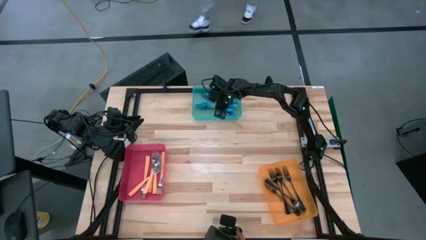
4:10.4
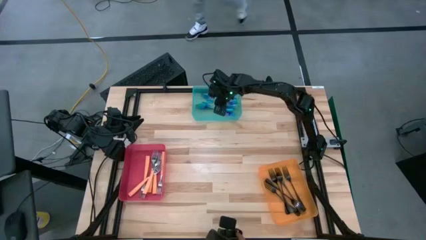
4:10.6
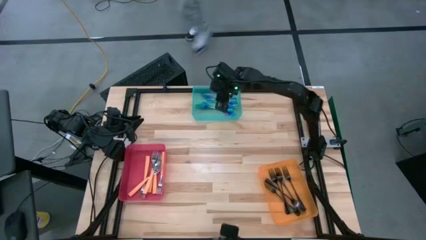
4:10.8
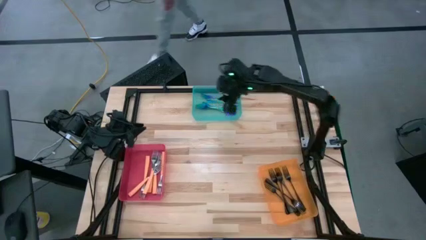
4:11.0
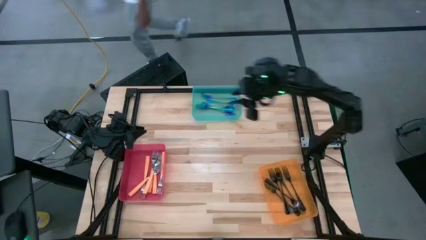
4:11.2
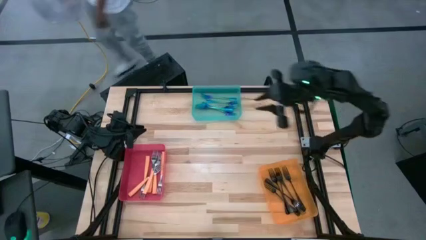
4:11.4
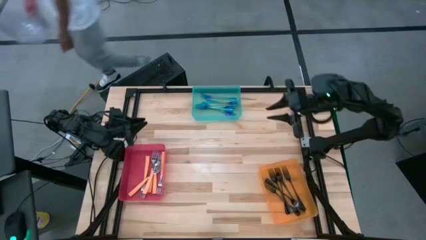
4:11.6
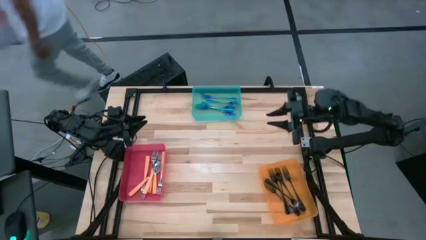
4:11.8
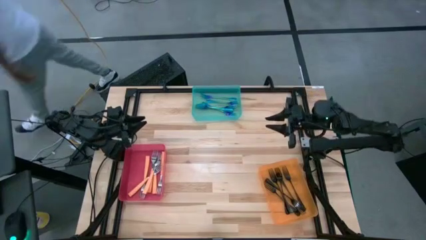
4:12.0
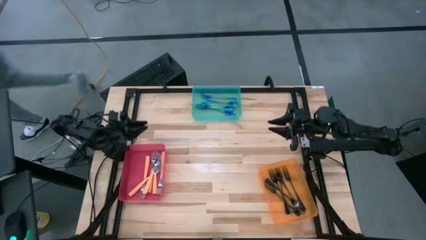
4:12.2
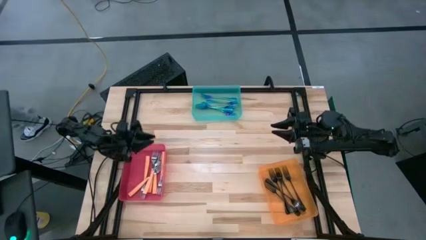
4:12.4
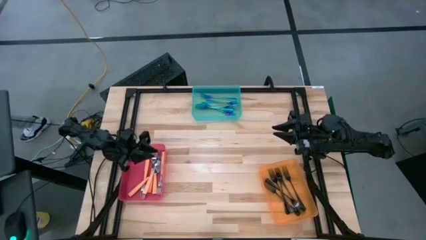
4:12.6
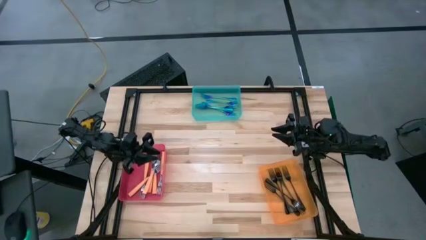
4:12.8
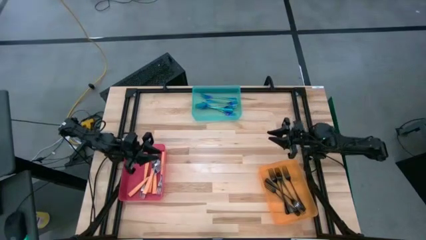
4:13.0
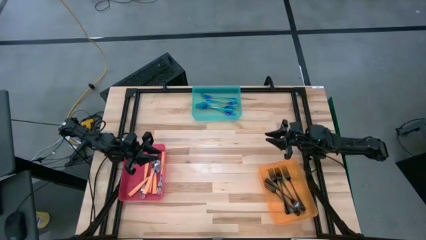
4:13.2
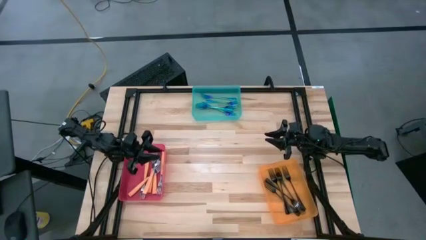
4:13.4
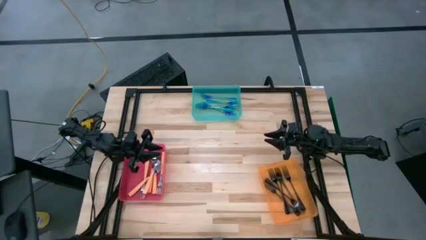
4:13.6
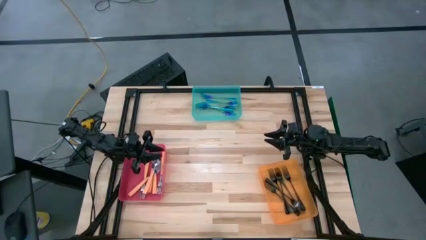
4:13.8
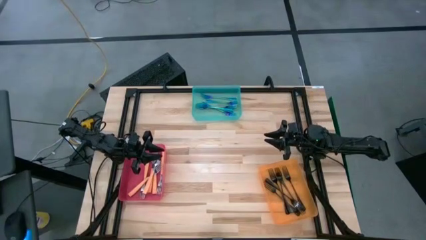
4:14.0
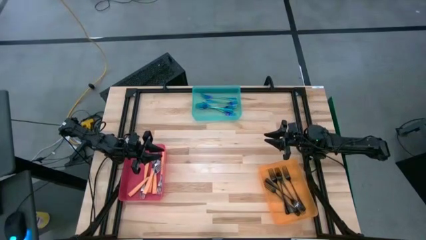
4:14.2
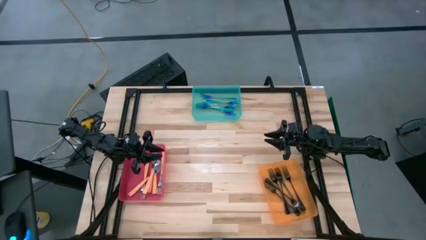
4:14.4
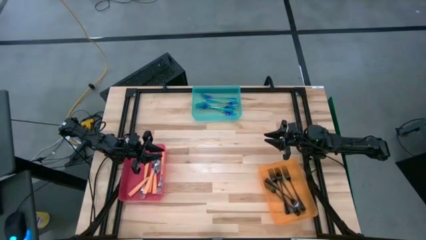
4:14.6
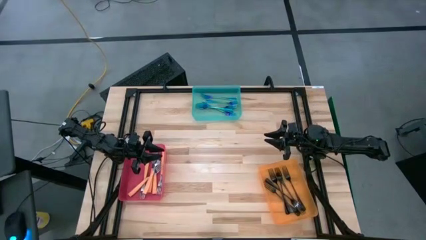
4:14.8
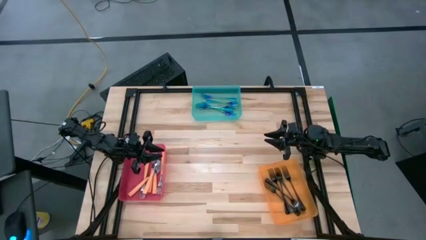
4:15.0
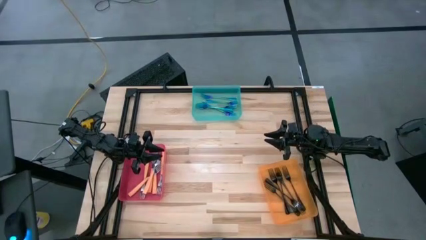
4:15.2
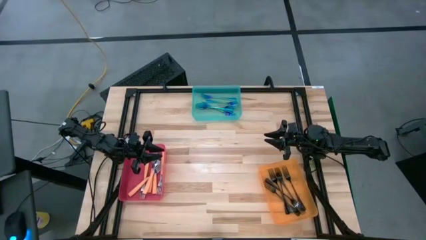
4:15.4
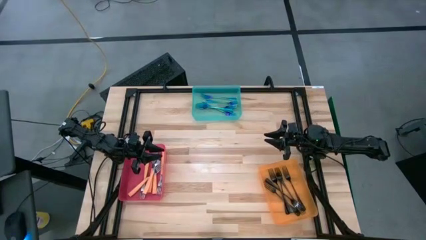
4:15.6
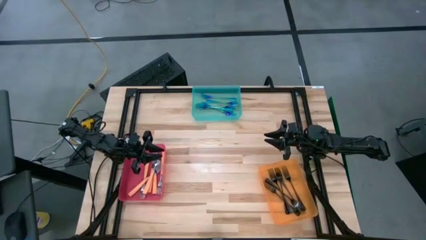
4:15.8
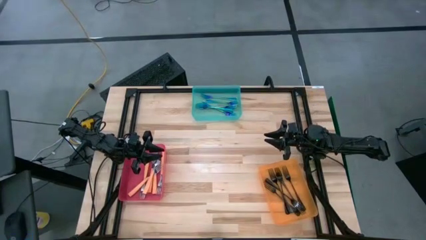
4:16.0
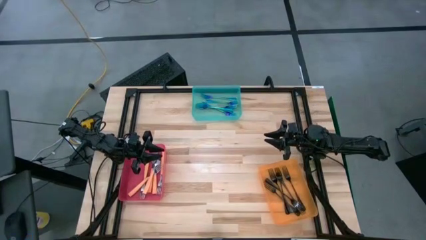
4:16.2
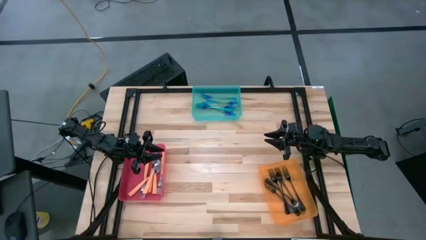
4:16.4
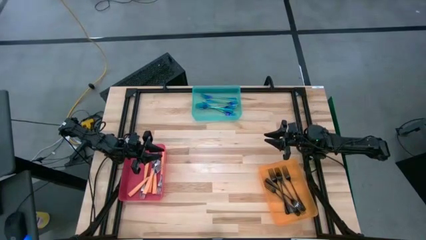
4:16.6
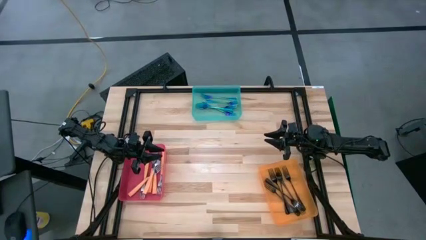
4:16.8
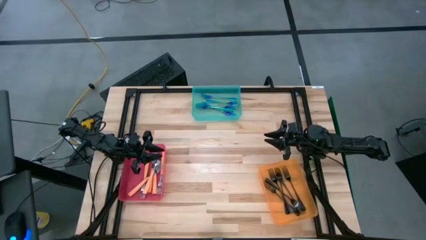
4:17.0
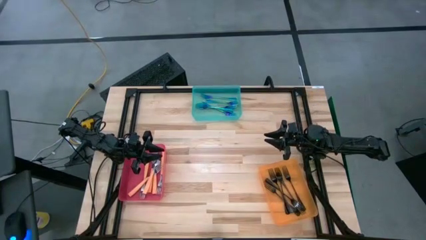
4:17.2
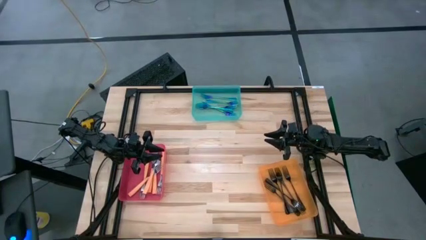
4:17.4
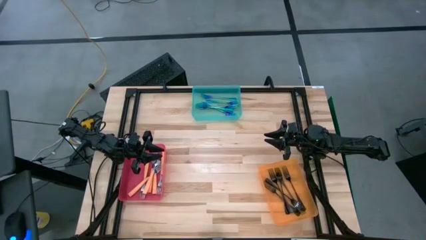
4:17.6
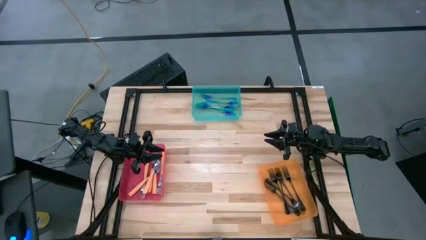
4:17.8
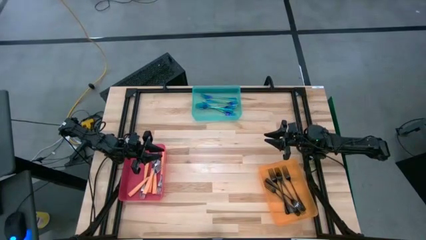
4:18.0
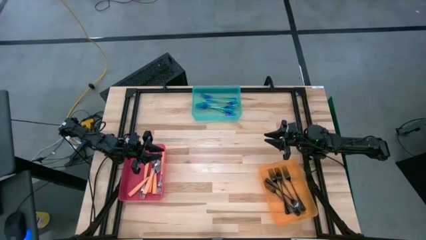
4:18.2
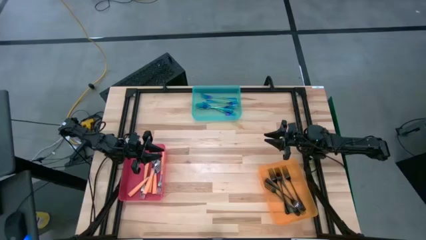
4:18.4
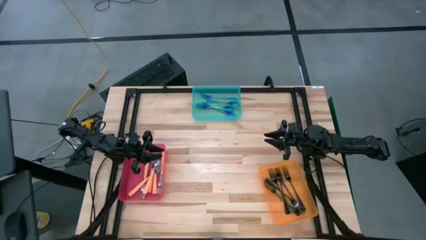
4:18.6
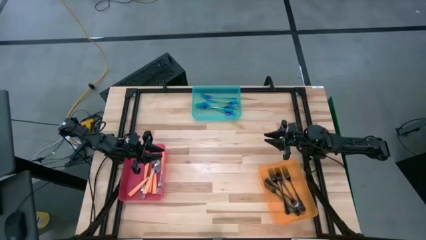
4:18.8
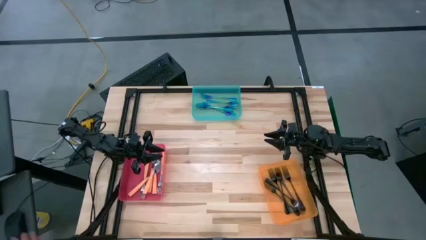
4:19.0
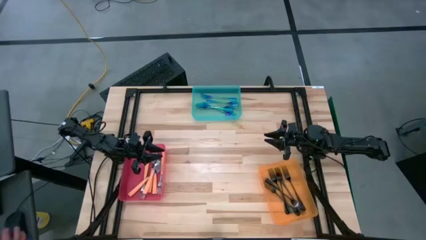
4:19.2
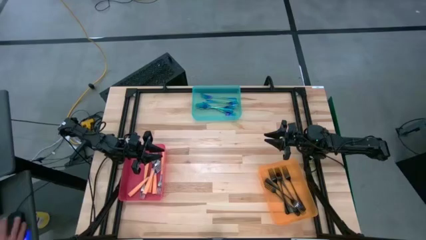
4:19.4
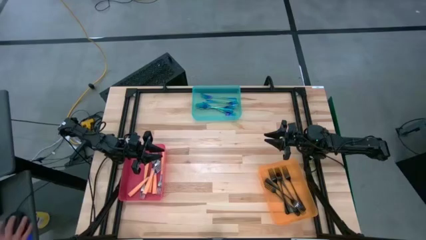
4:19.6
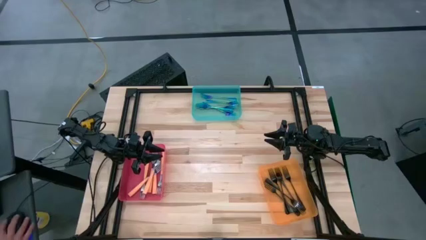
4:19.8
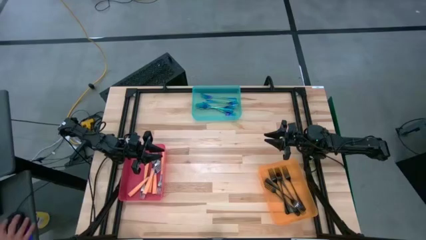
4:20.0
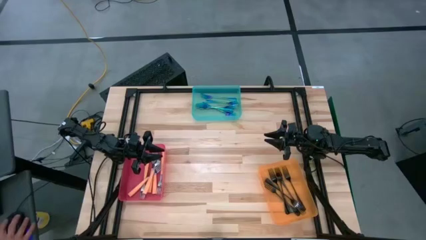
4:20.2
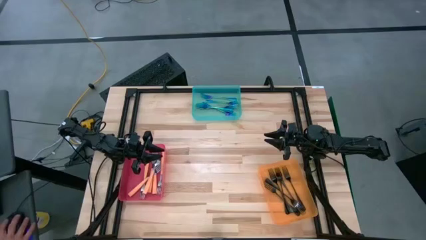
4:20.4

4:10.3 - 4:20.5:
Task: Sort silverware by color (type)
Return to Home Position

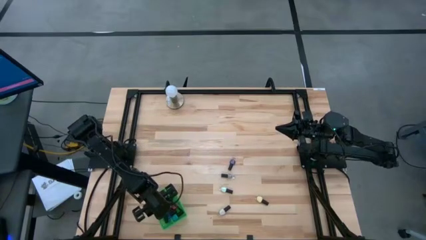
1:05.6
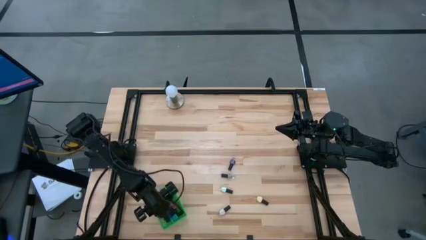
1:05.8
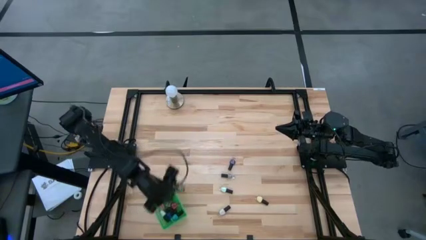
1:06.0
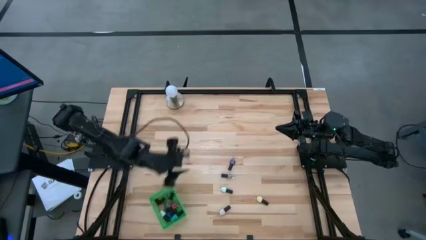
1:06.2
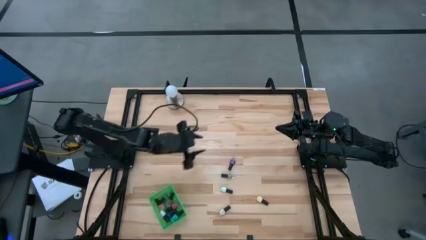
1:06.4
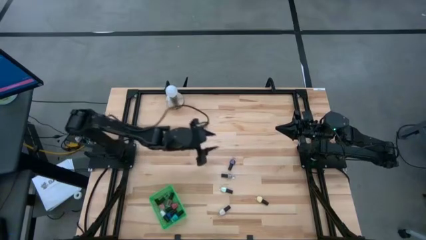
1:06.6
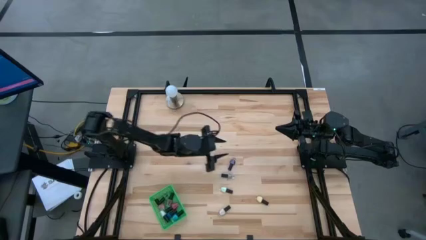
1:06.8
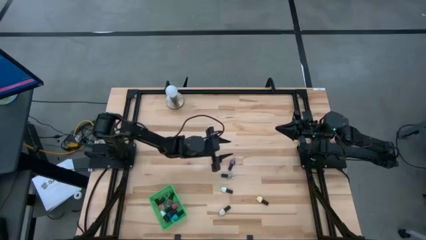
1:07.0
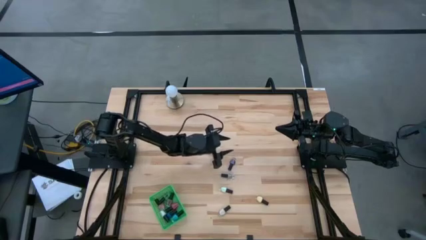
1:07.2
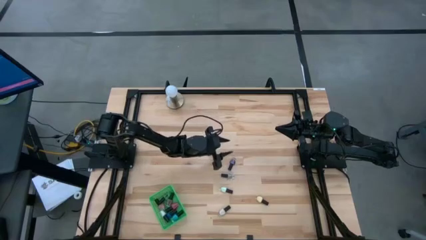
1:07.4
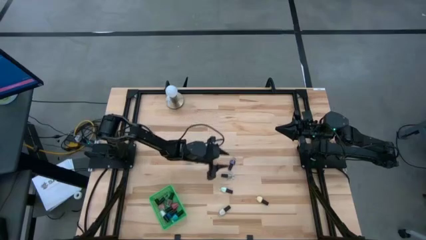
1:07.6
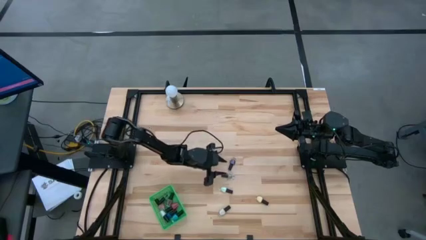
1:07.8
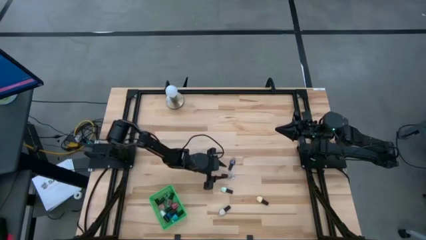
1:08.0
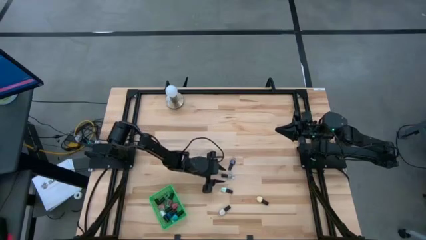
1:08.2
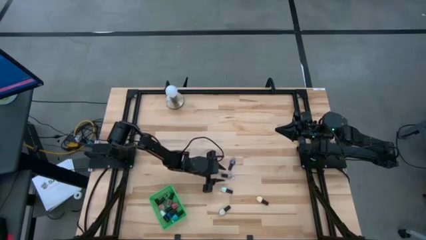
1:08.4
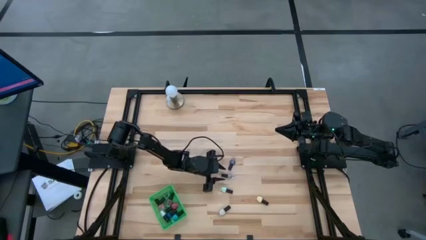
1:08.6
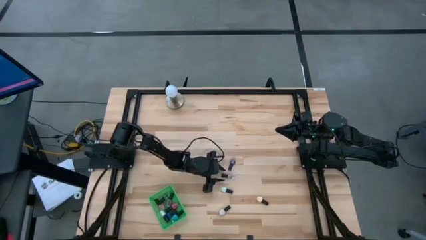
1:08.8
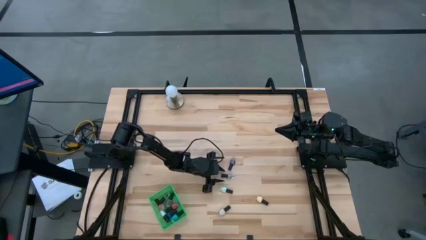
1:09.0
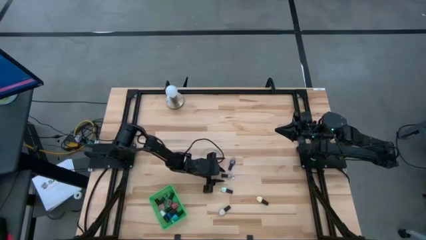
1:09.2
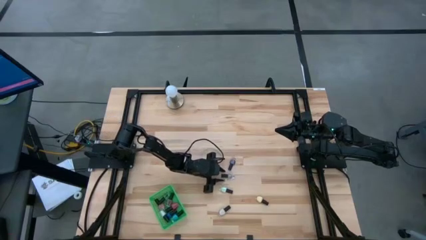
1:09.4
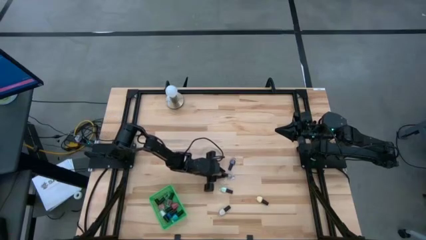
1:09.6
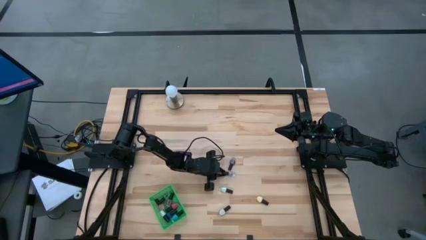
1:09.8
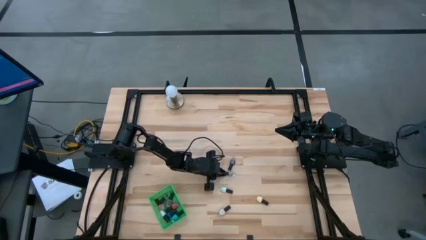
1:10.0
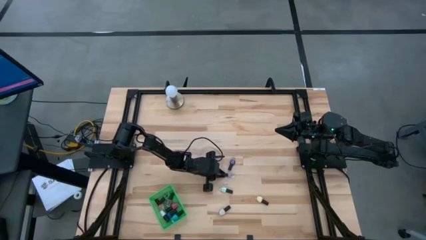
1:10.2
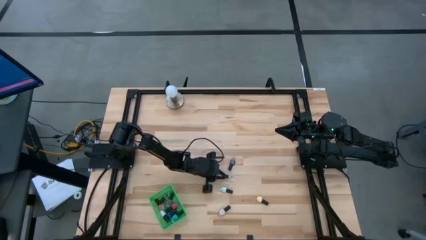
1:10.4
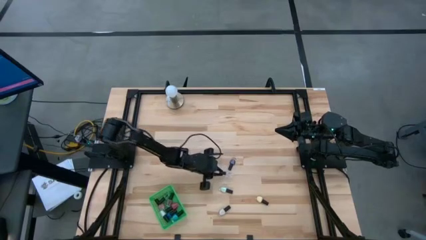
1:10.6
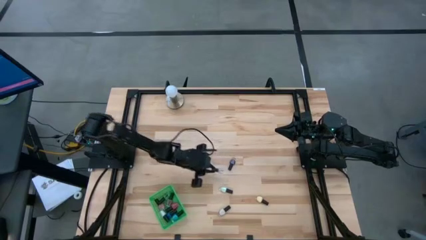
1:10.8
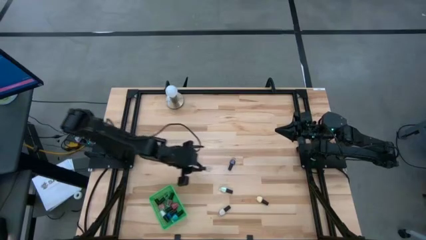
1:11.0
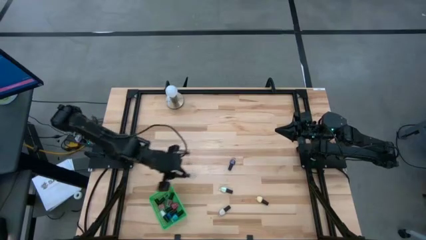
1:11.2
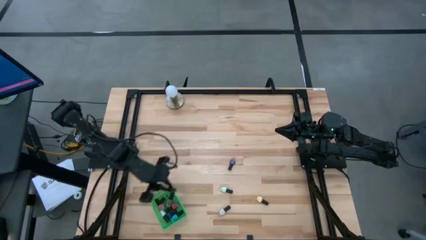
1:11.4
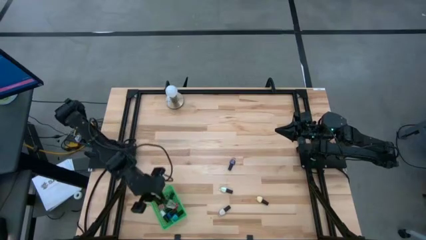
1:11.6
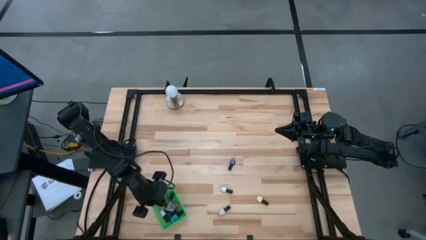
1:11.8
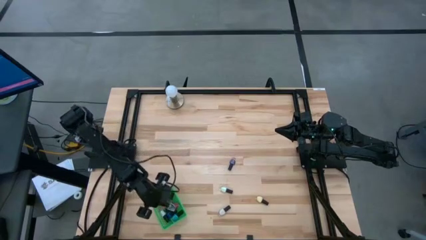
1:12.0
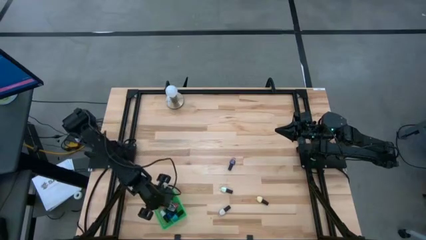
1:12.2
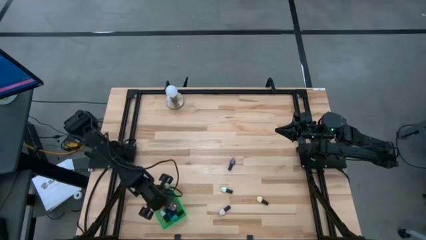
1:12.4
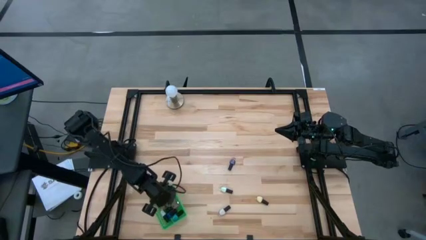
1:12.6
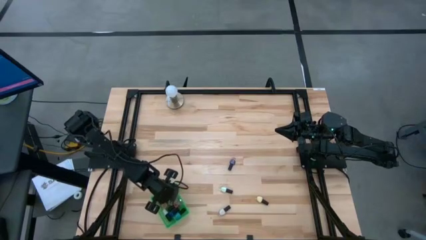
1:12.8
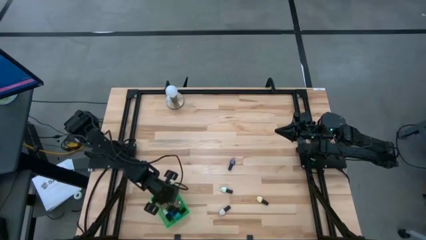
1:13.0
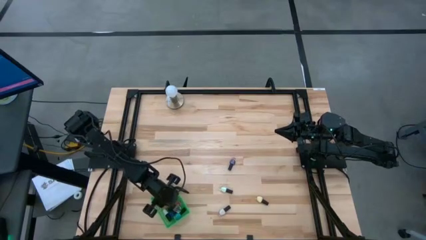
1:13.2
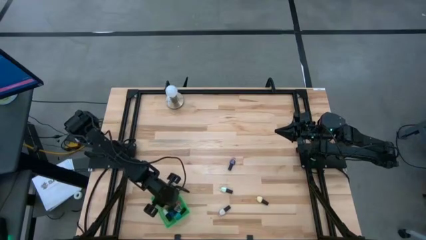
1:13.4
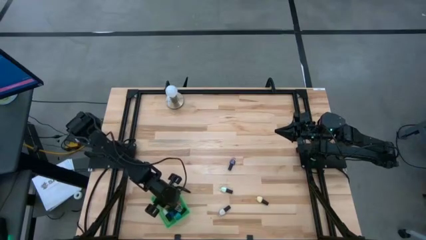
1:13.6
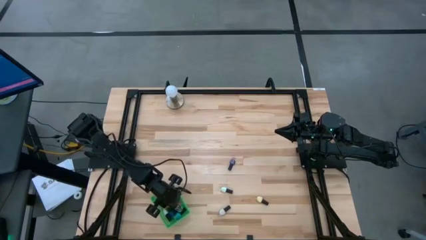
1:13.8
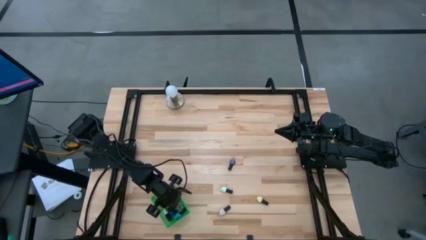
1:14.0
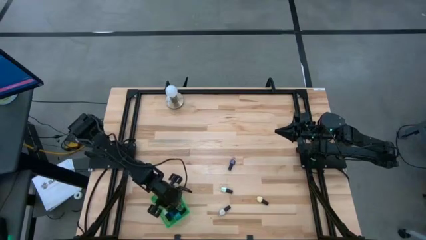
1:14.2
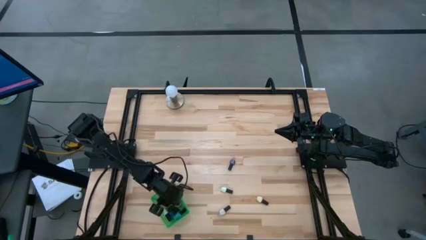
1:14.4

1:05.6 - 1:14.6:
Task: Pick & Place Nail Polish
Put the black and transparent nail polish into the green basket
